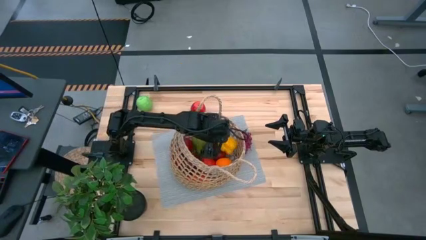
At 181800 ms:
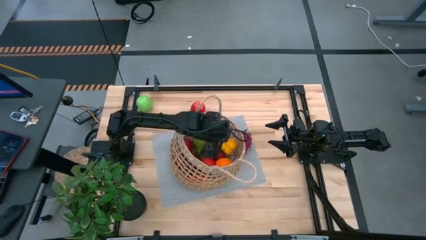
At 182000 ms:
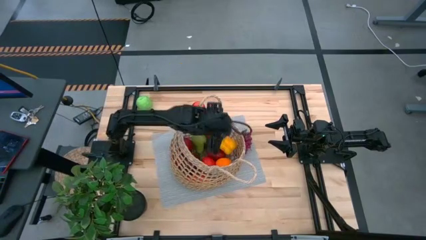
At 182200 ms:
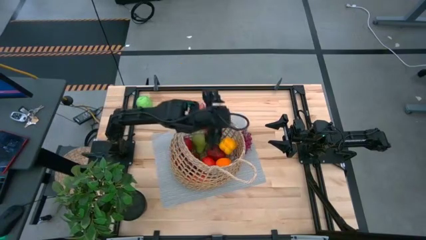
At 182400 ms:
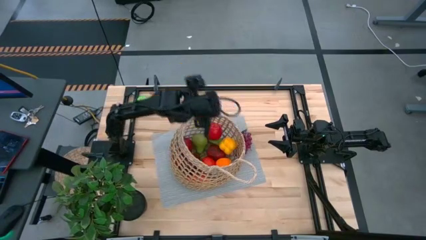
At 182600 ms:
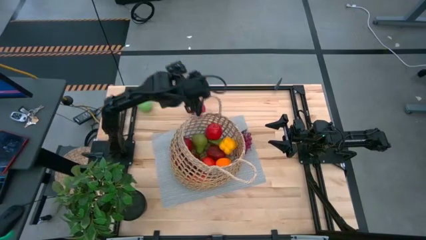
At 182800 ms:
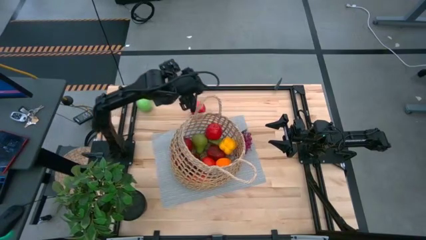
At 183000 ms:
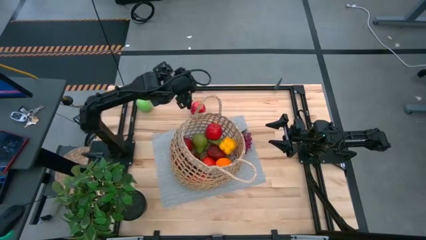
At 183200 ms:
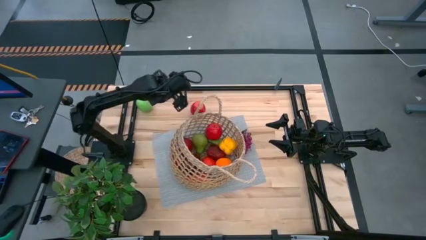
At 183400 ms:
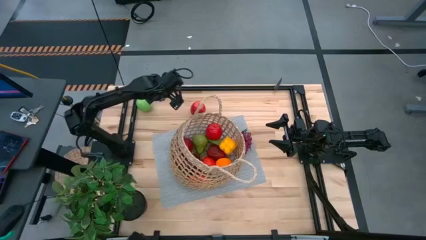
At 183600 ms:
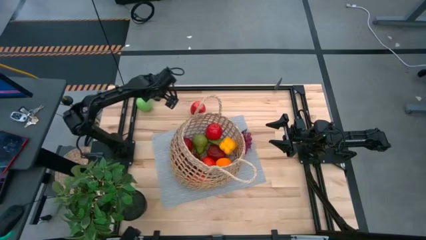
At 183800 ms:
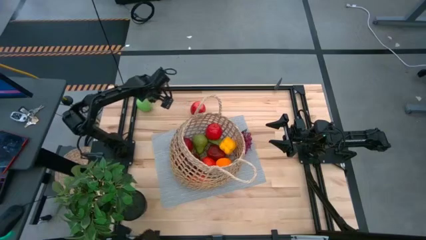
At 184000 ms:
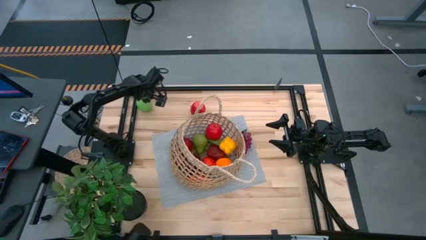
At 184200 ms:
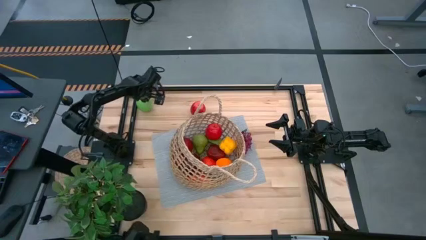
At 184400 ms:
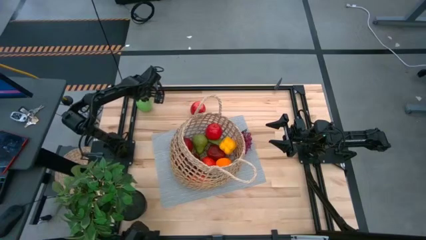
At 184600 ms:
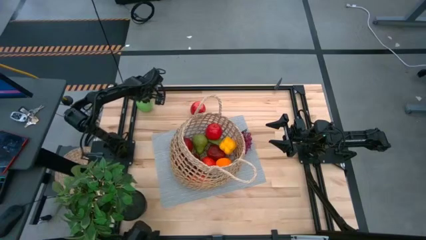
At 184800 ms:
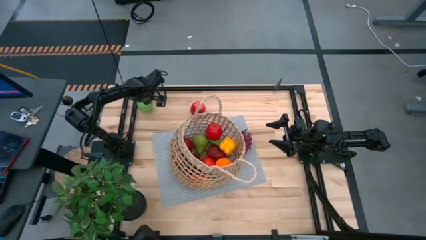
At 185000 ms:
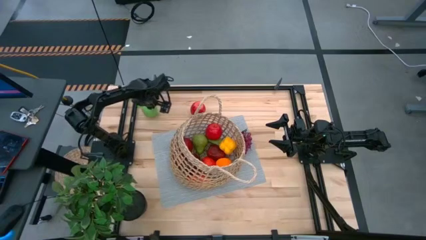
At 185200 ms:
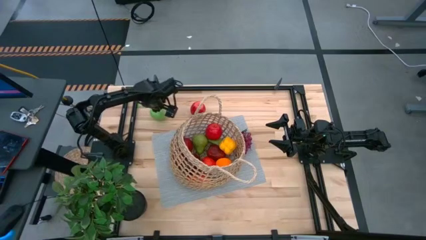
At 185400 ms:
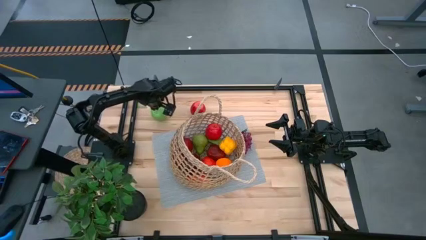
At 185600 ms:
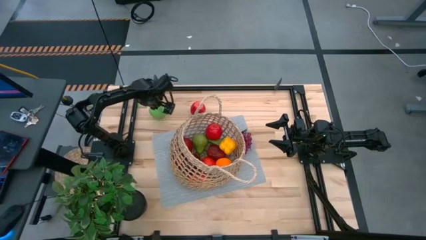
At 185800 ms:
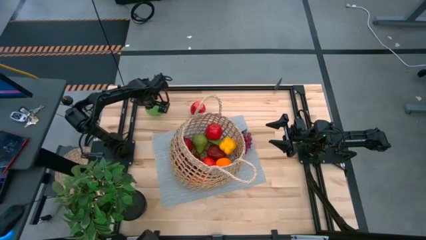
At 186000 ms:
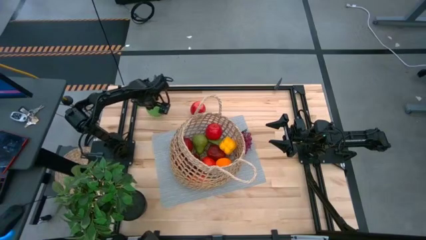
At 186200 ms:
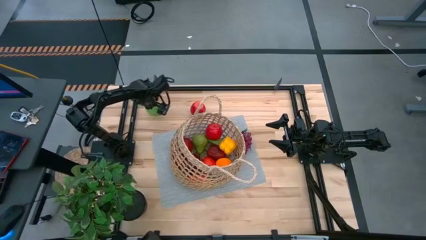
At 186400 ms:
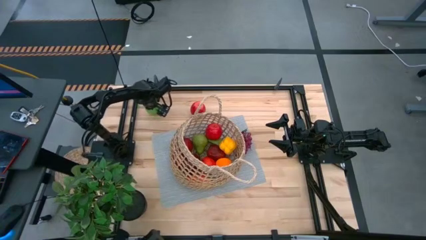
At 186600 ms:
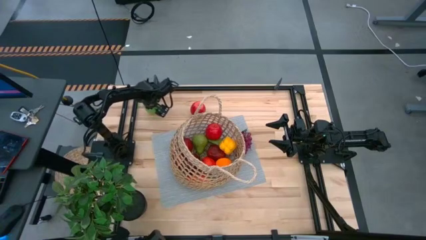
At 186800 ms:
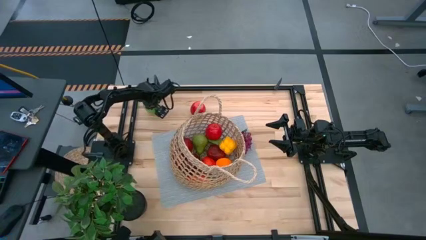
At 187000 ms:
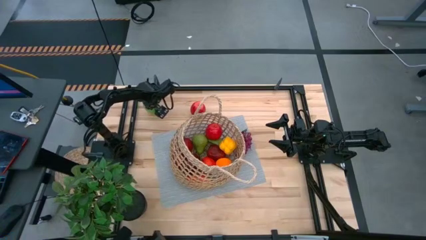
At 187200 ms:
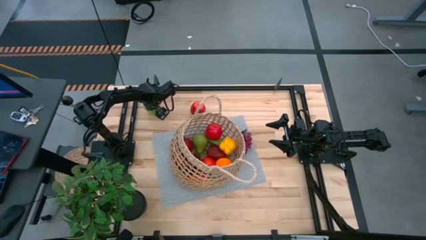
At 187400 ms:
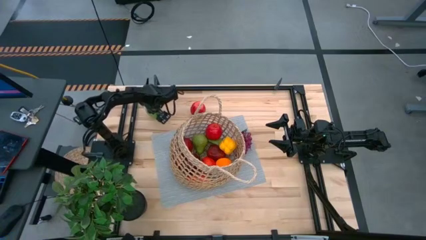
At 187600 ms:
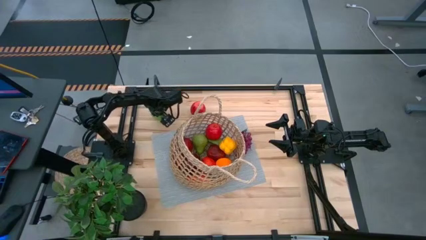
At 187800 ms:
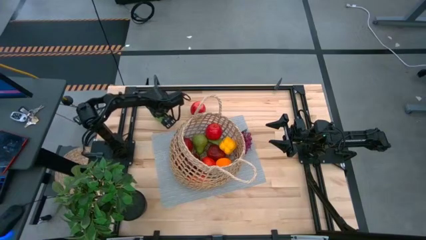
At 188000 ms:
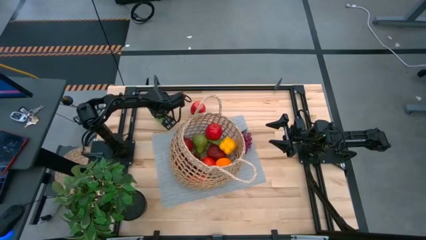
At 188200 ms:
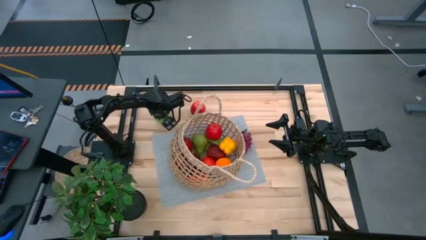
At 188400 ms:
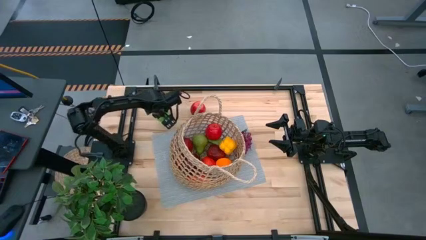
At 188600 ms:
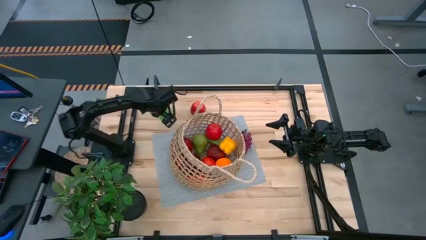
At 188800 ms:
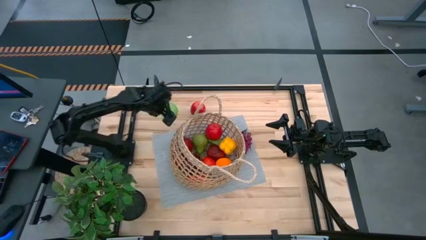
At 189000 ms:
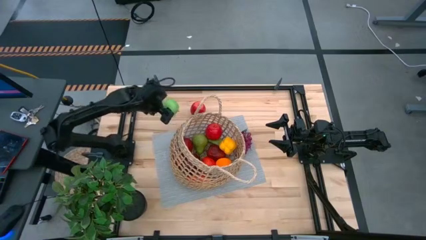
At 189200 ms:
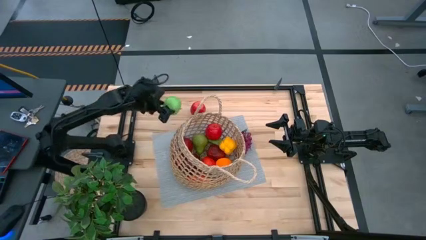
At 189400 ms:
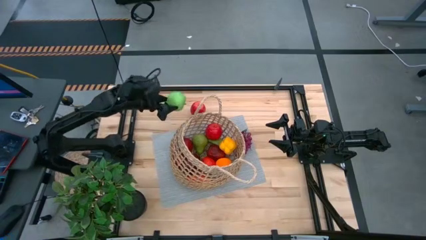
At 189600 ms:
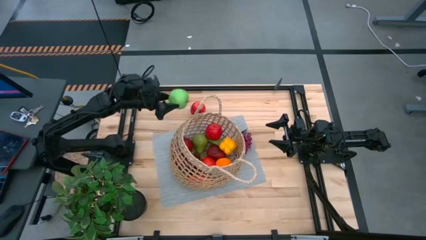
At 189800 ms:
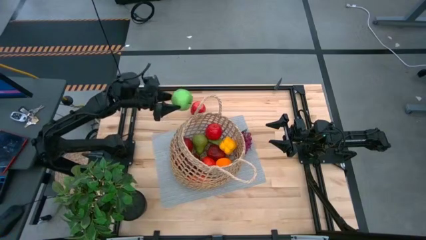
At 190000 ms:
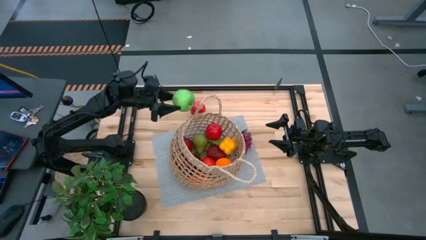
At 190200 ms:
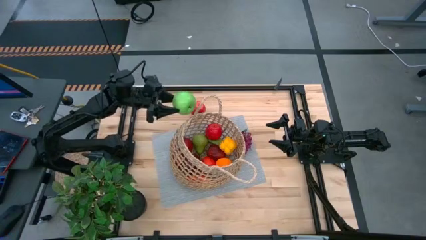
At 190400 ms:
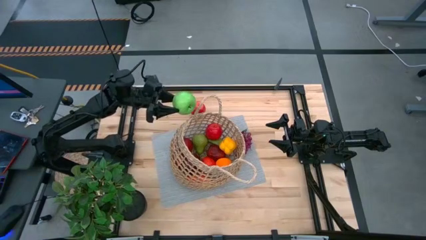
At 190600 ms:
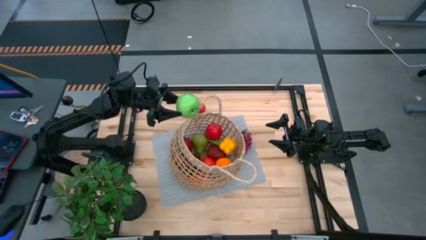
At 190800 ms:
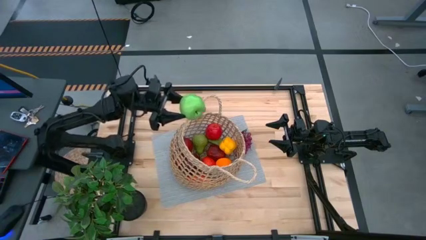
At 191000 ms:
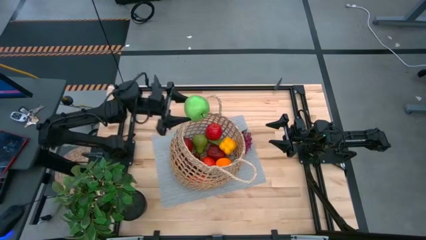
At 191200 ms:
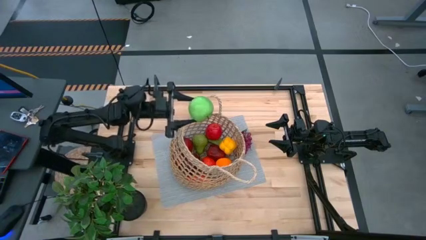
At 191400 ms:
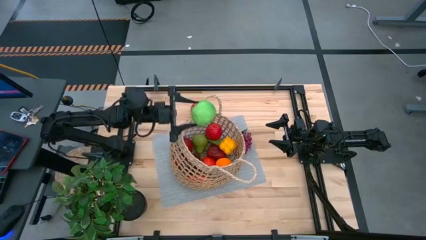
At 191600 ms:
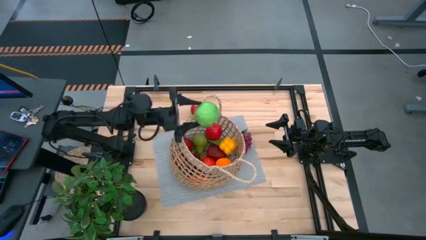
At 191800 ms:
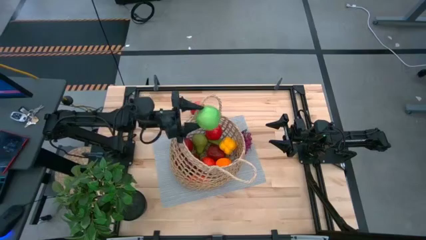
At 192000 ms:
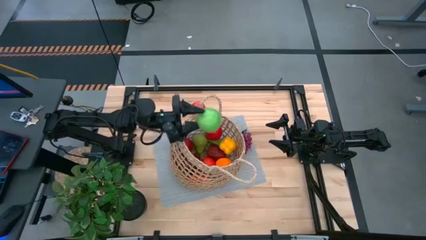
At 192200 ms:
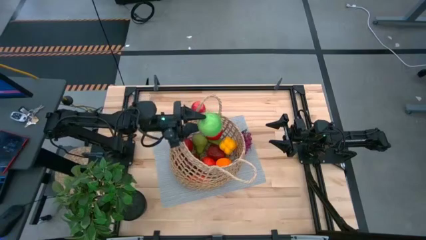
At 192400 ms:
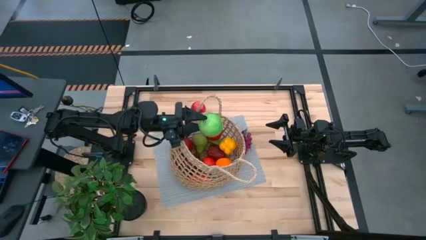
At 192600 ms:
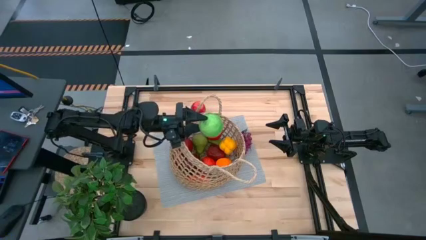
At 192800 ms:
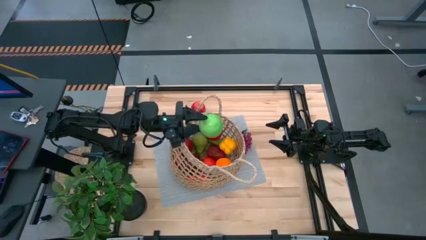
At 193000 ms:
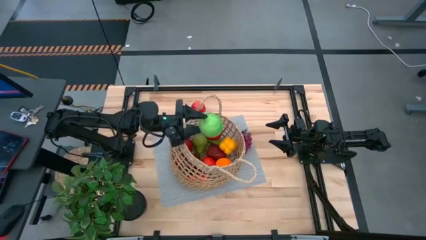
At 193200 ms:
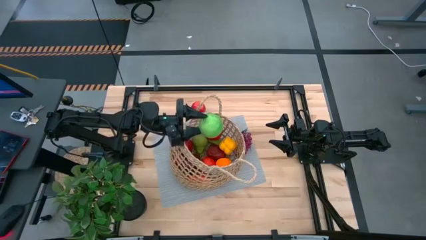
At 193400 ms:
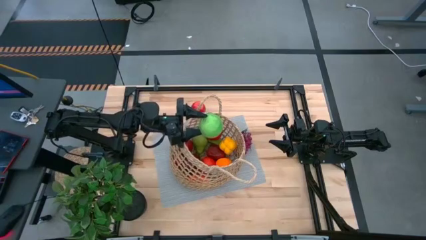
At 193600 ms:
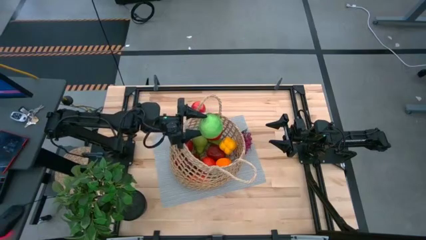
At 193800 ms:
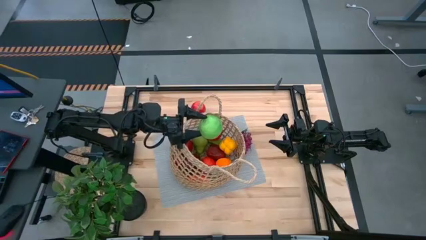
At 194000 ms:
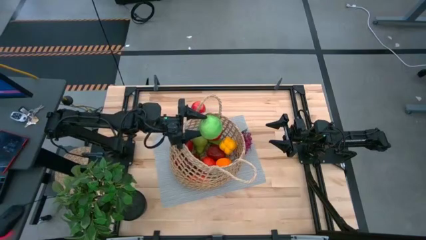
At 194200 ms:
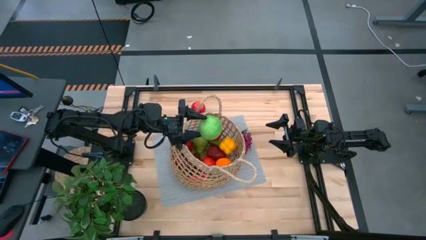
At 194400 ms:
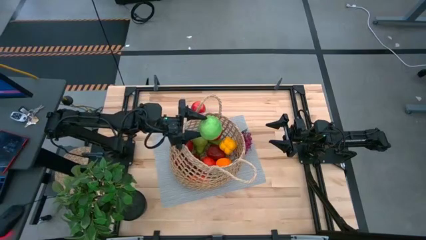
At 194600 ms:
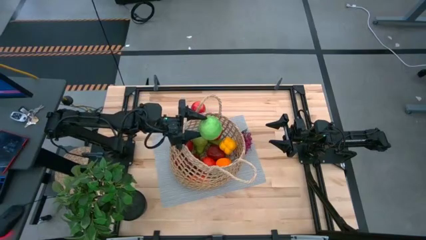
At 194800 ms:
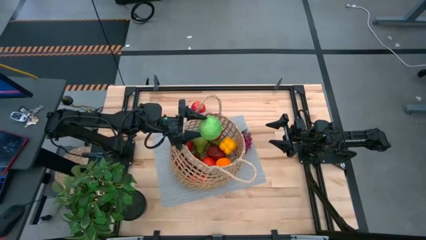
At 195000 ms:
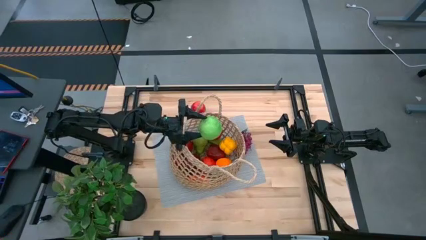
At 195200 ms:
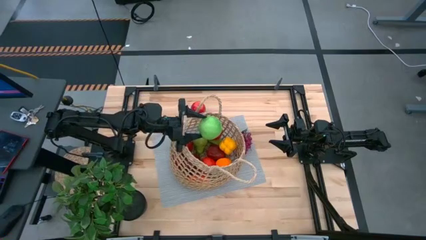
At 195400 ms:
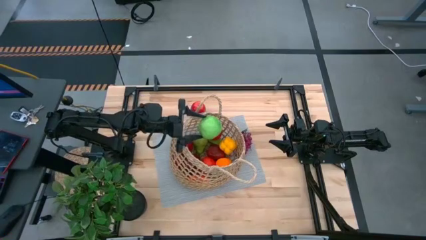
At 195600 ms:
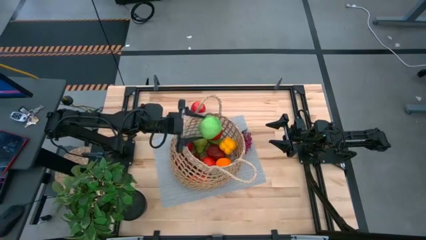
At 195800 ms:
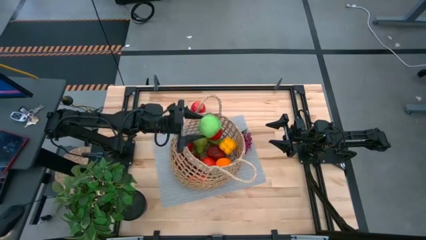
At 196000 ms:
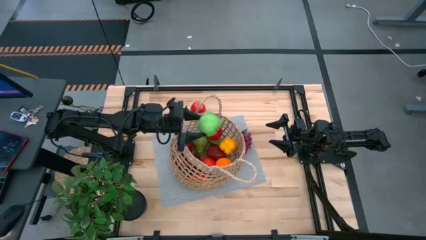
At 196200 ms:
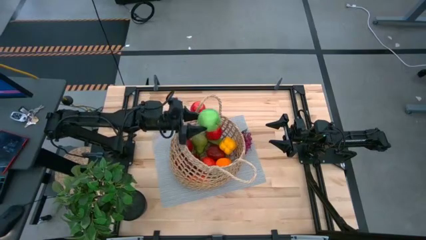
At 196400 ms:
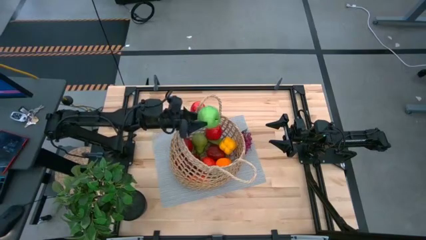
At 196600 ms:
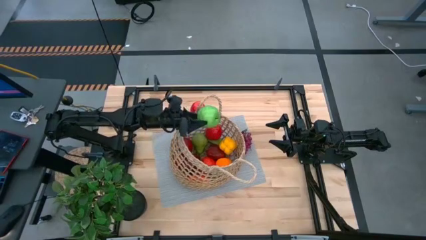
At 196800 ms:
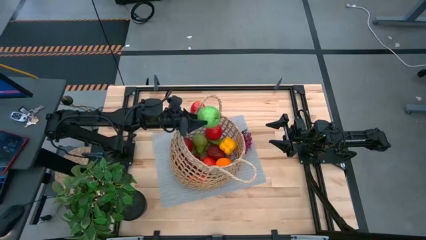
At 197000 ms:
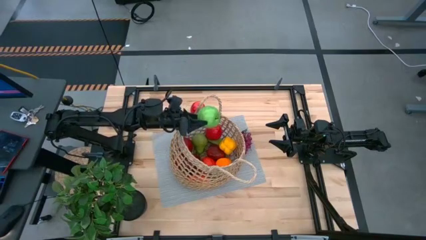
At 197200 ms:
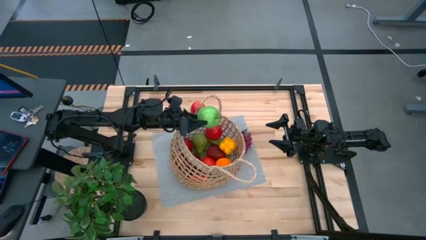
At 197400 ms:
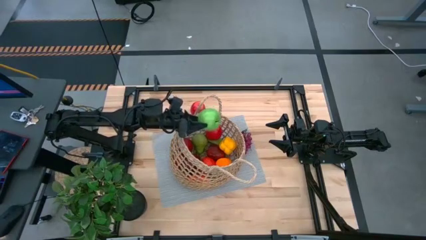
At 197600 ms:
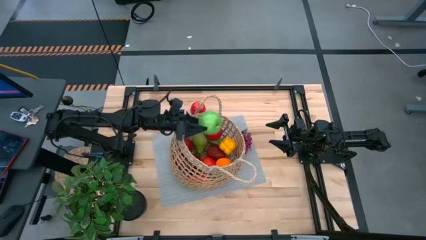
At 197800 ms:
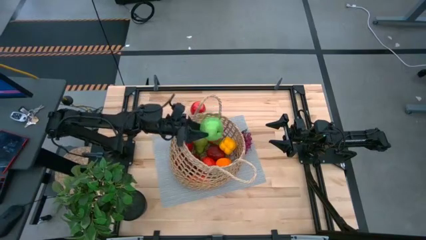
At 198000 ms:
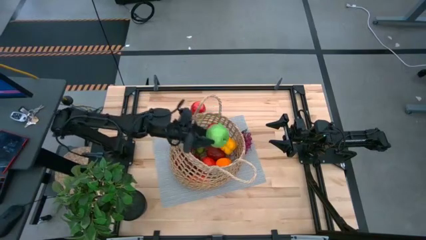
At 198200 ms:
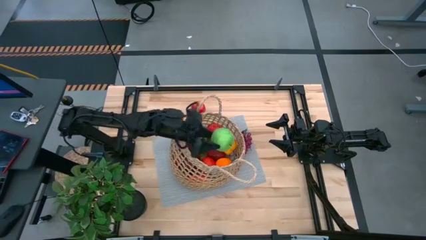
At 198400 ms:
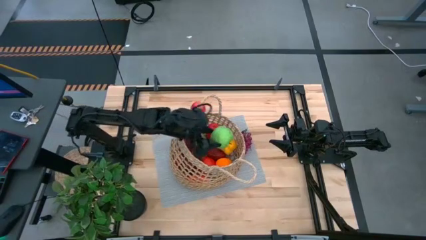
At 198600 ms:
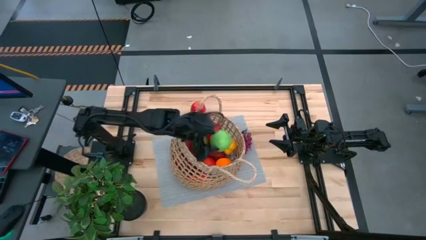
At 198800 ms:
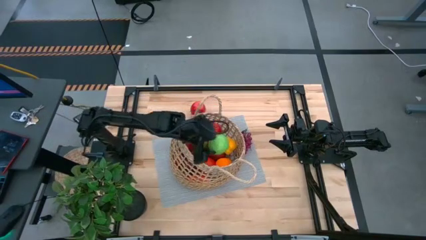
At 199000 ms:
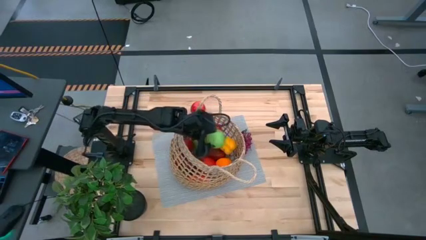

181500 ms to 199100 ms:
Task: Build produce basket
Put the green apple into the basket
